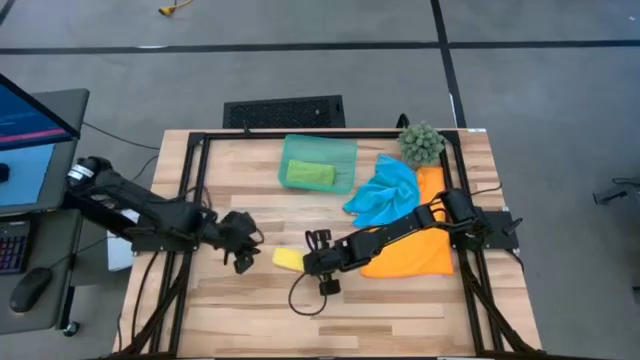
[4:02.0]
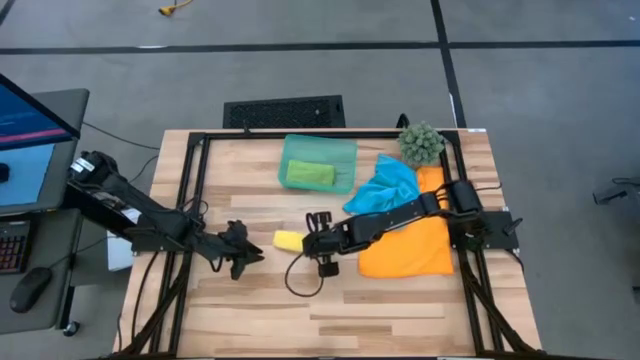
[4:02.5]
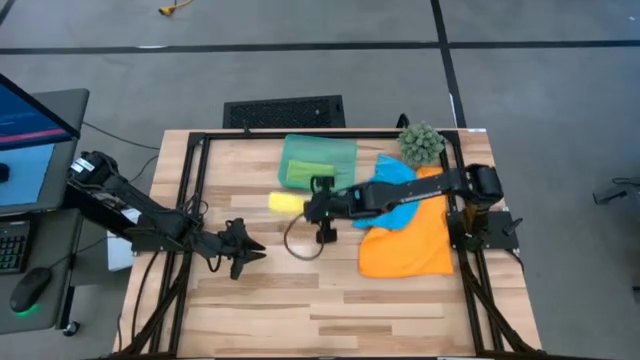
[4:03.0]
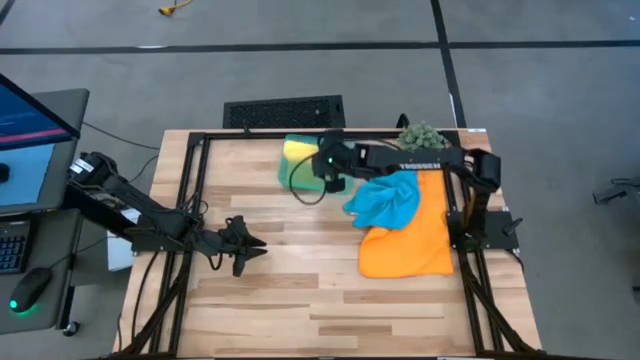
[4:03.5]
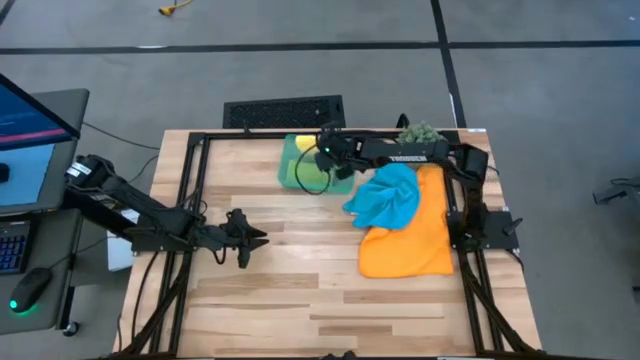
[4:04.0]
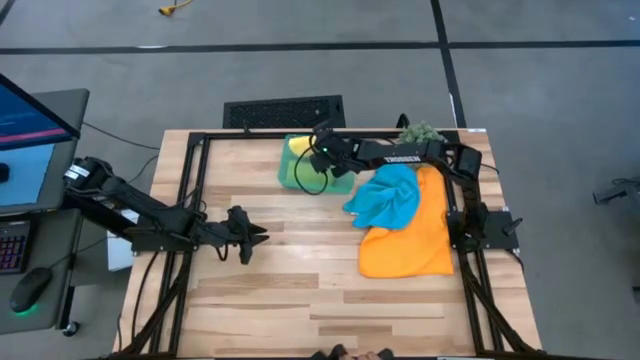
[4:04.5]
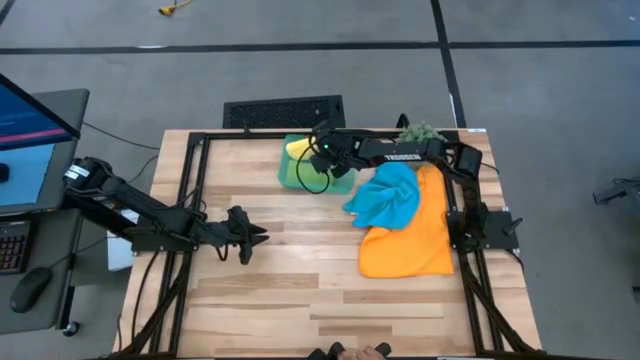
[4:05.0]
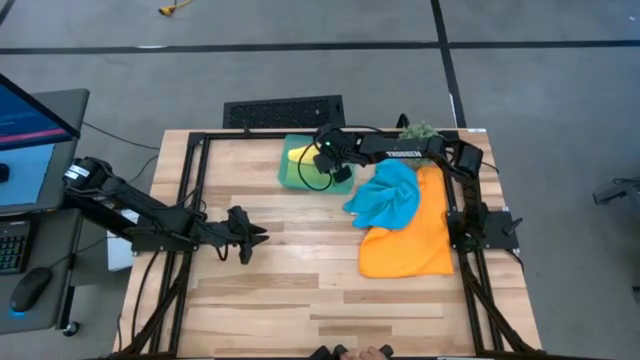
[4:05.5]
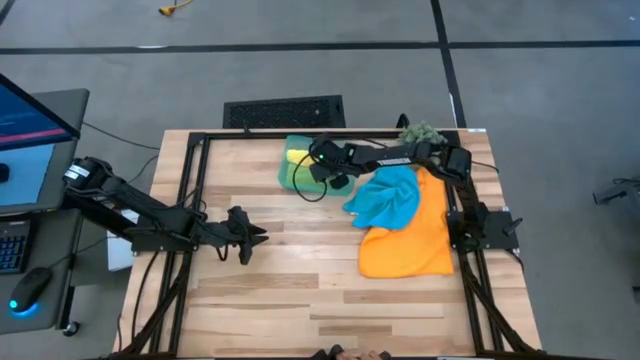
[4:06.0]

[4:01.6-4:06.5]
Task: Roll microfiber towels into tight, uniform cylinder then place into a basket
Put the rolled yellow microfiber cloth into the blue bin

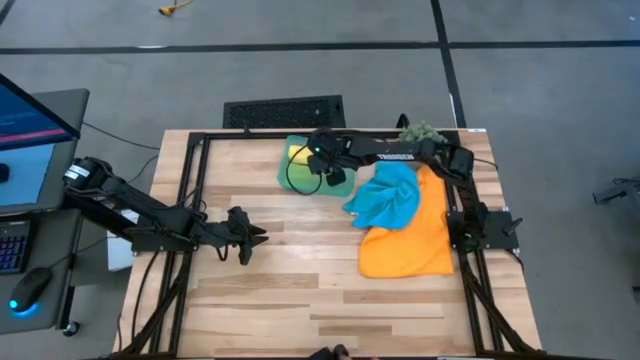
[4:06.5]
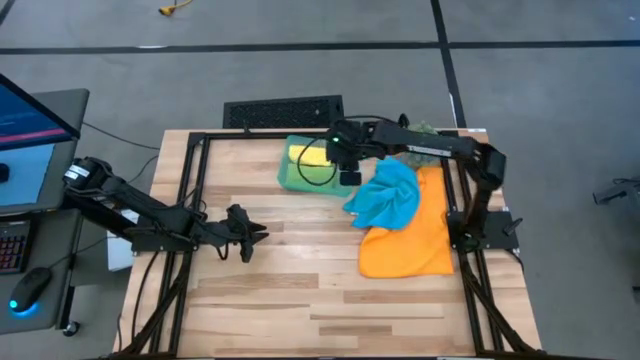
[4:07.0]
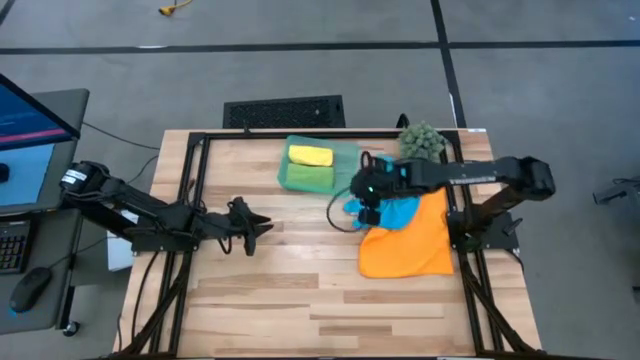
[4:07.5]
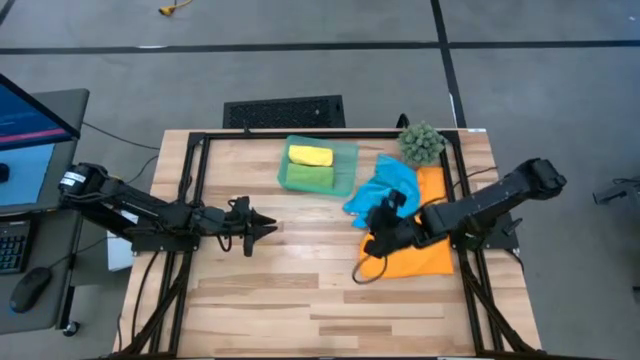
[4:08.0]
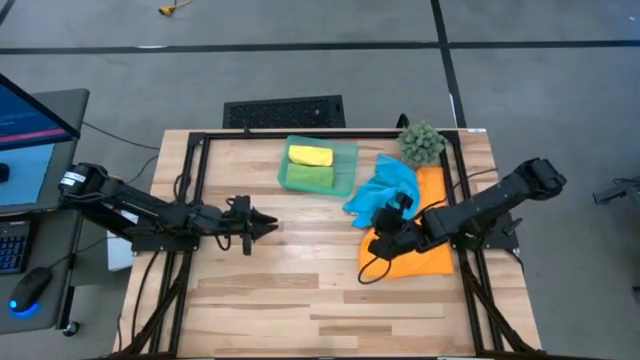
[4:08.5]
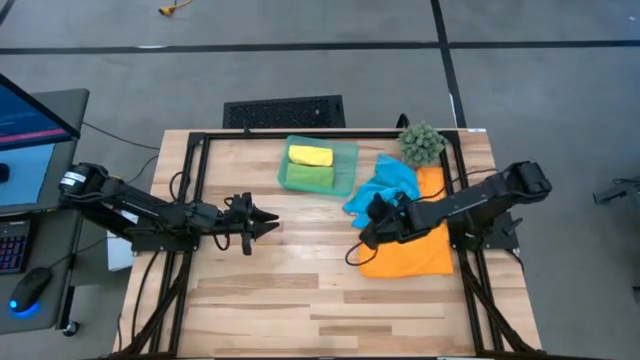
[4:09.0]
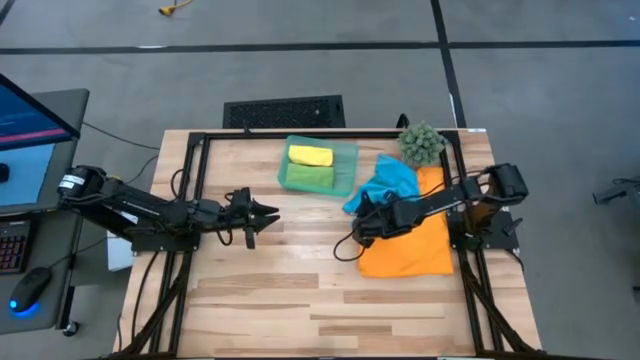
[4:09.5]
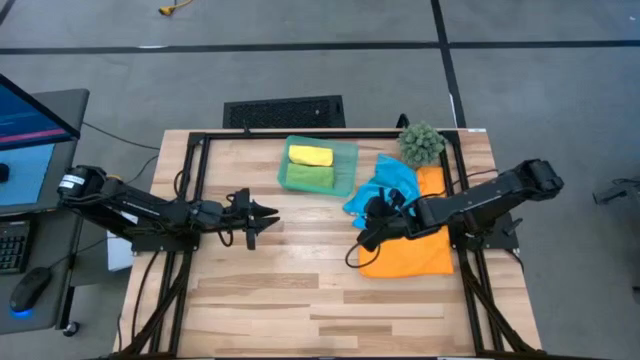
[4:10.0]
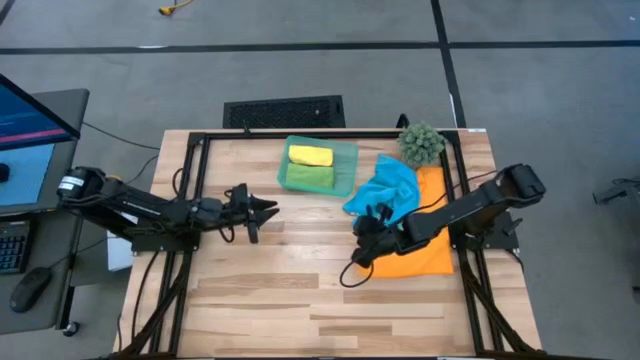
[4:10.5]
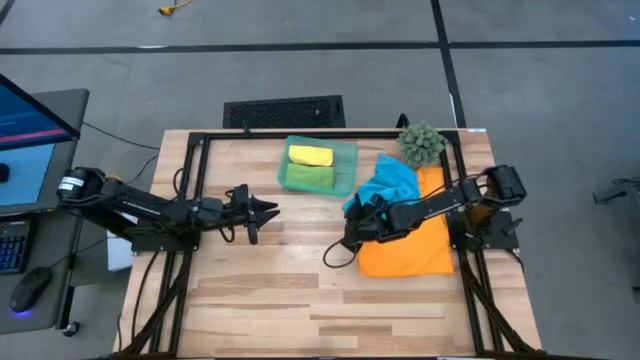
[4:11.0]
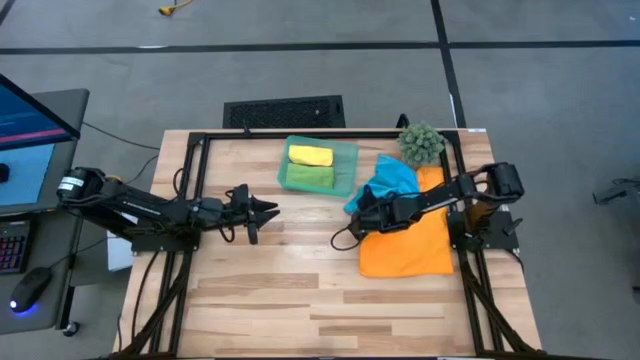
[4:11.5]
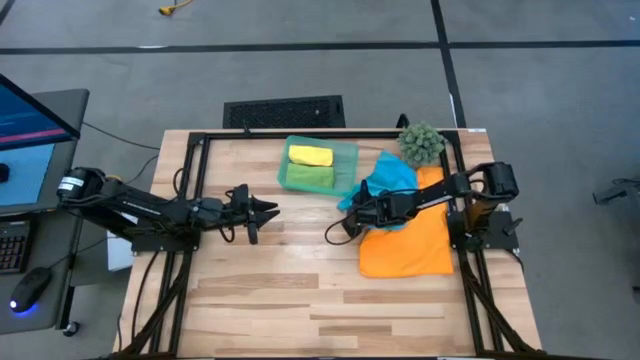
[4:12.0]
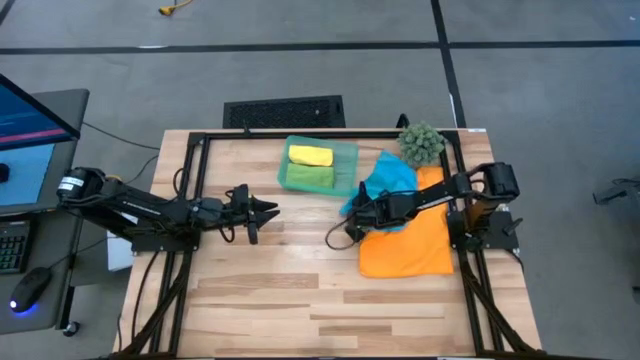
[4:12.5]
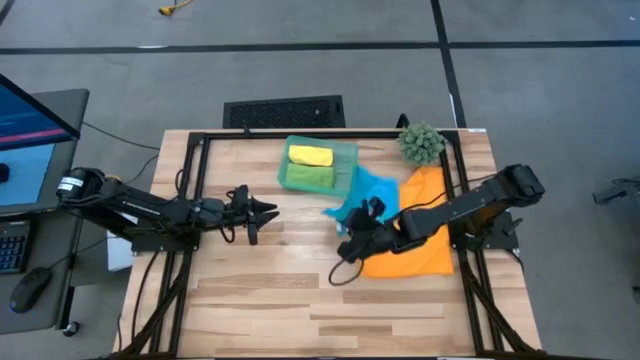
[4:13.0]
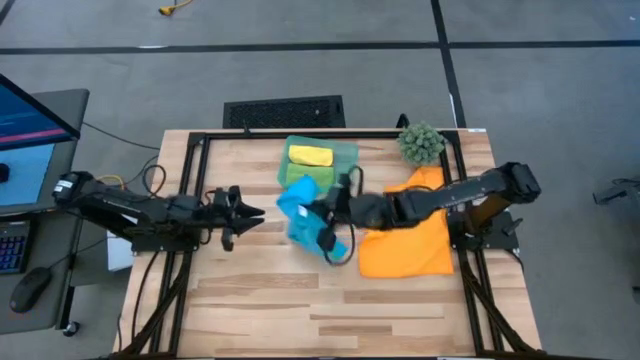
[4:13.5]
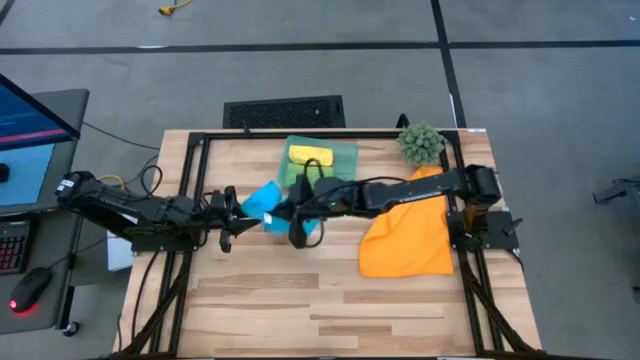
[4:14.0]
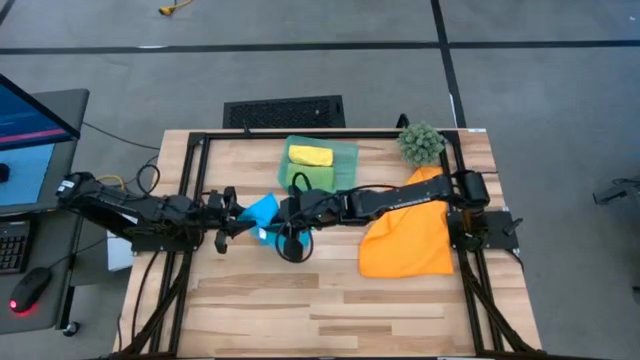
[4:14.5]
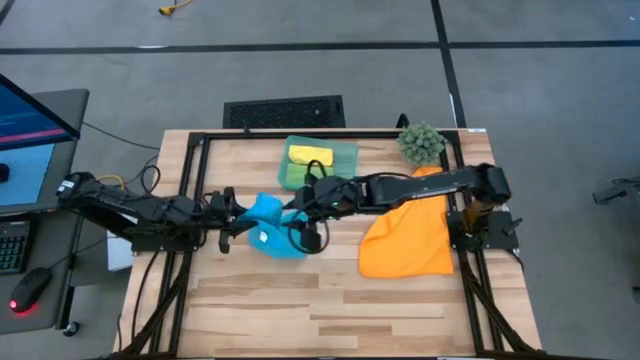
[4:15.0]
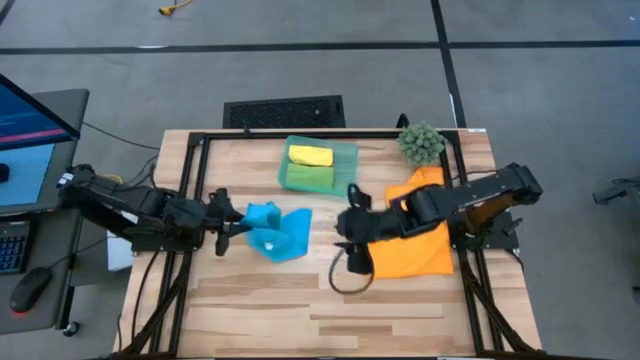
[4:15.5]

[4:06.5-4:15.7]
Move the blue microfiber cloth to the center of the table

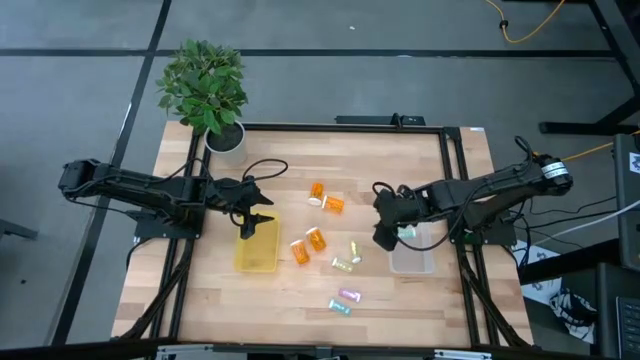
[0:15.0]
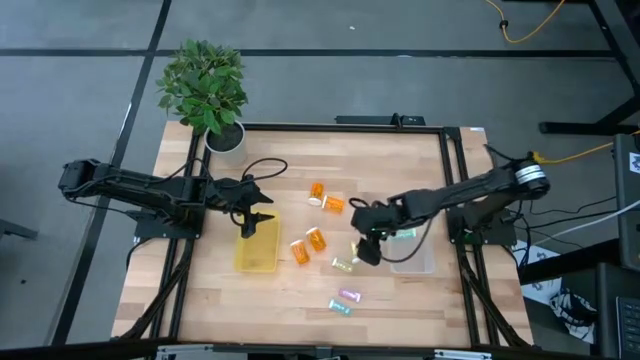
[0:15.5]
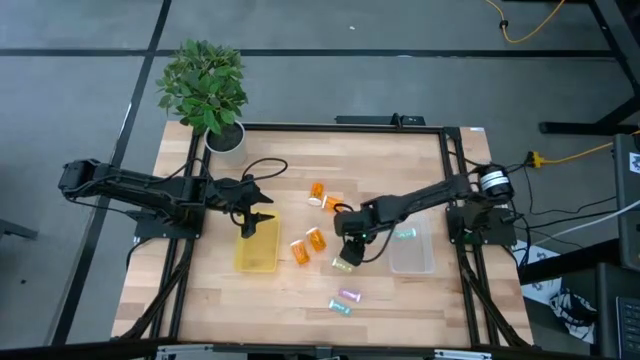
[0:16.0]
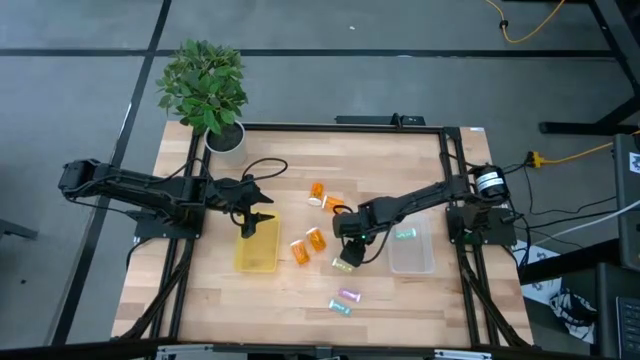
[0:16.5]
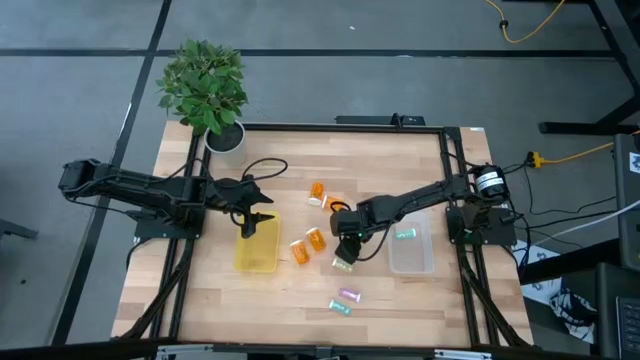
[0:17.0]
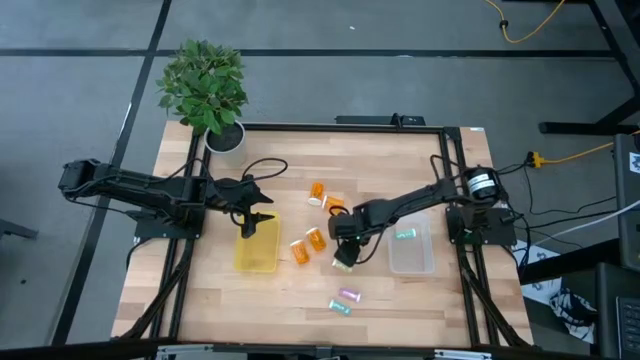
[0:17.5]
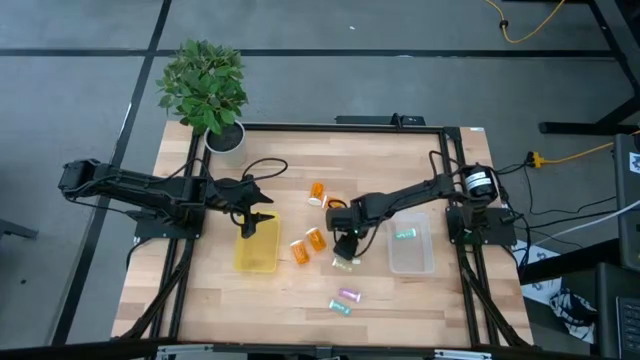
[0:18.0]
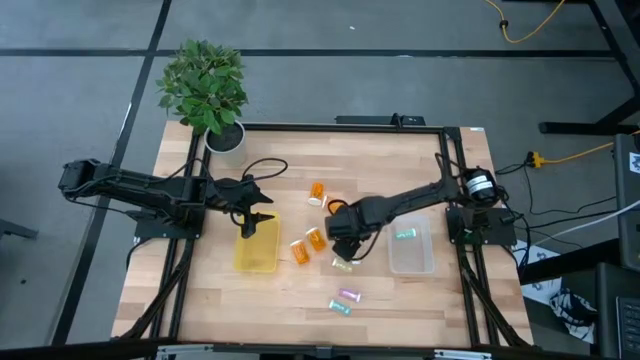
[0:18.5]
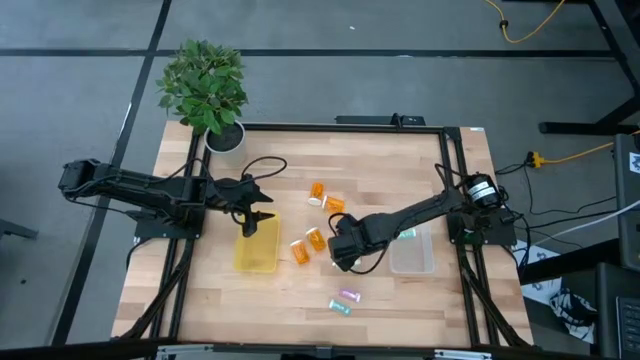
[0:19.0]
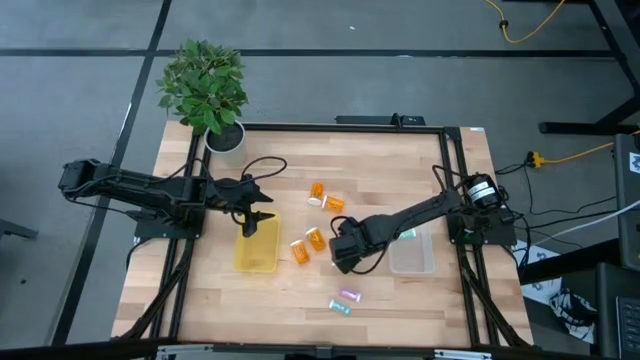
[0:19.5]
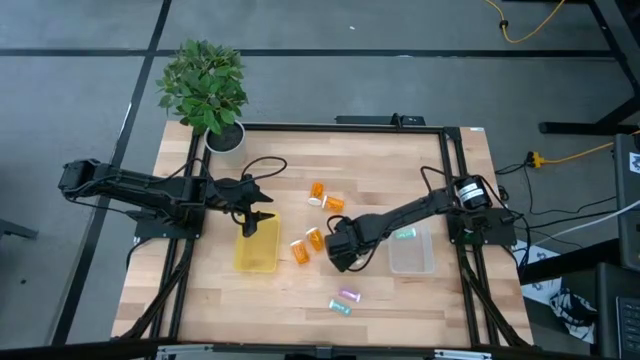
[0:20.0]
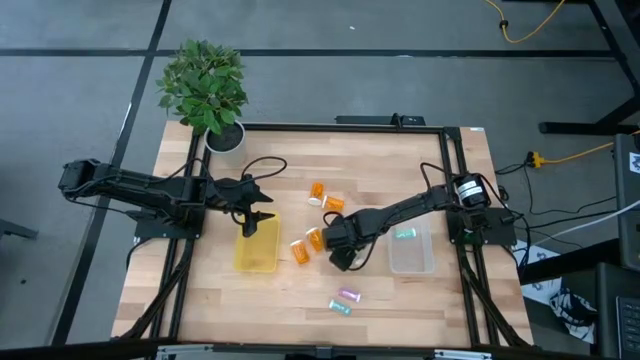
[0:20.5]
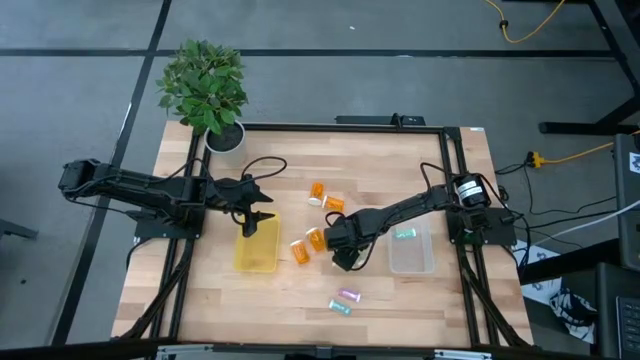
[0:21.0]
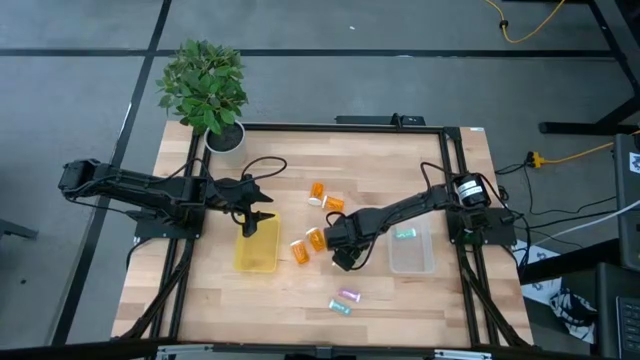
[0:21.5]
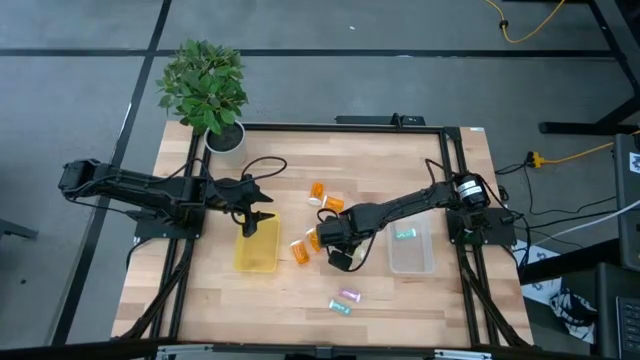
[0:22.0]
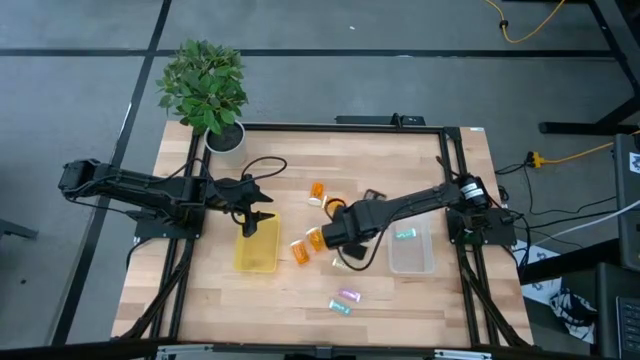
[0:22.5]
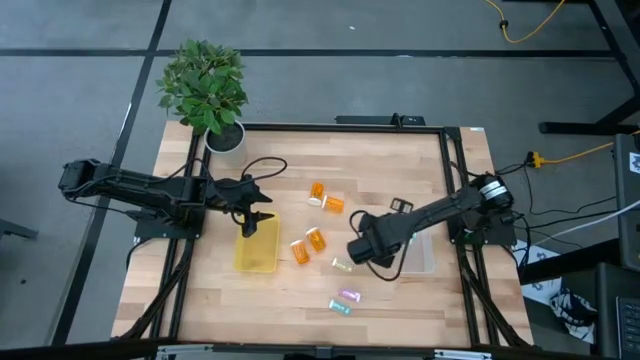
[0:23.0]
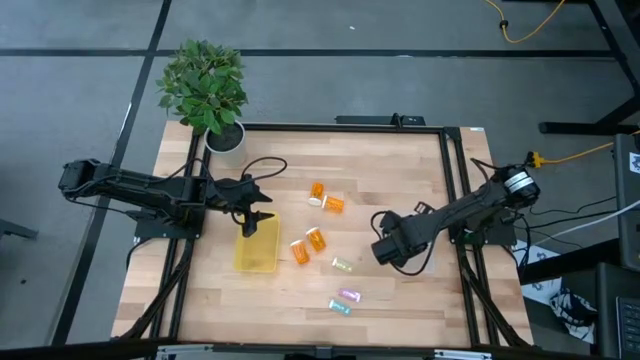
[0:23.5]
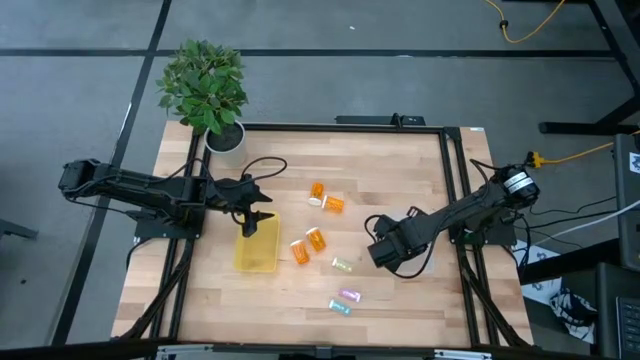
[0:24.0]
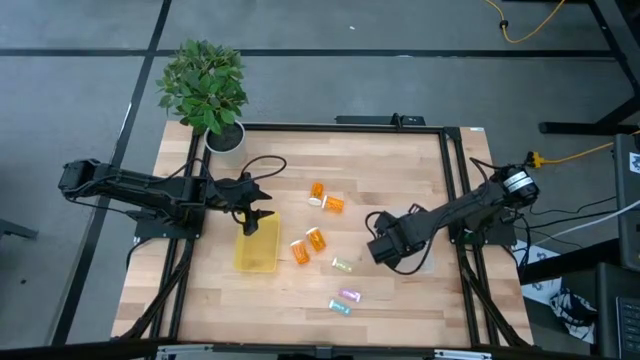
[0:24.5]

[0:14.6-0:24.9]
Task: Pick and place medicine bottles into bin by pill shape (circle, oval)
Put the yellow pill bottle into the transparent bin
